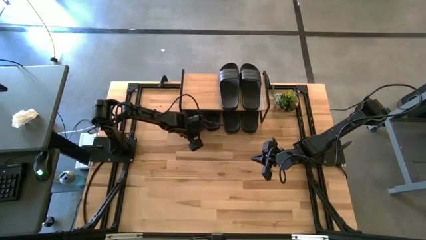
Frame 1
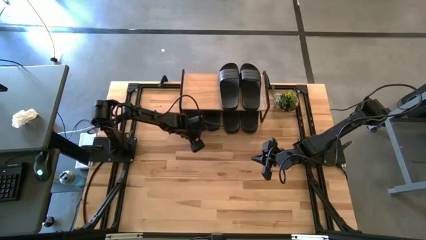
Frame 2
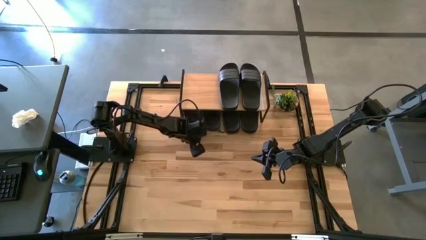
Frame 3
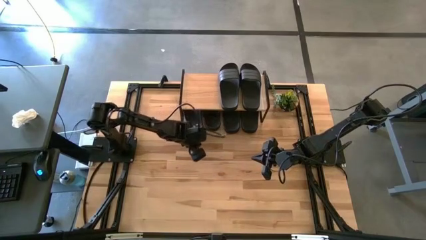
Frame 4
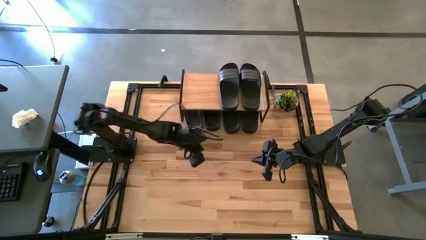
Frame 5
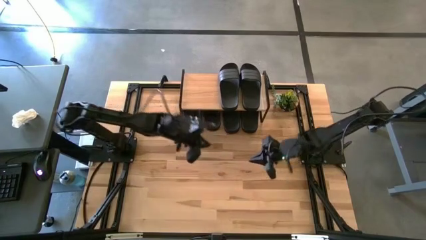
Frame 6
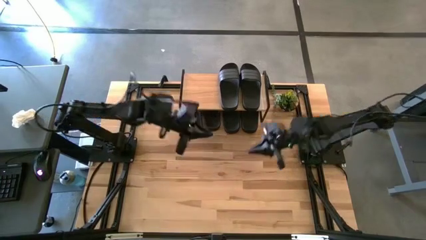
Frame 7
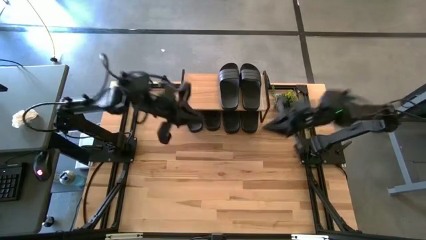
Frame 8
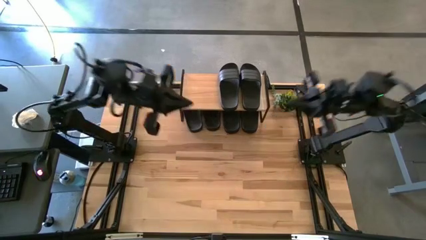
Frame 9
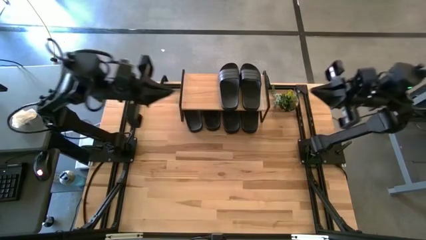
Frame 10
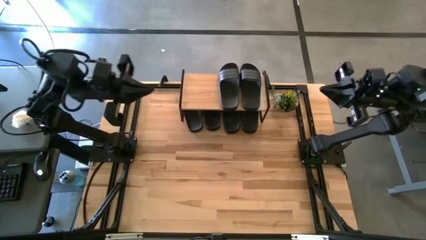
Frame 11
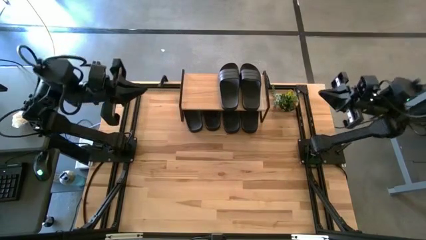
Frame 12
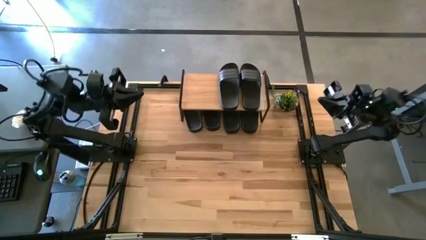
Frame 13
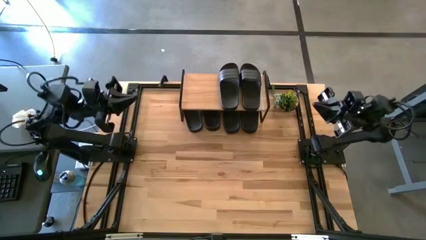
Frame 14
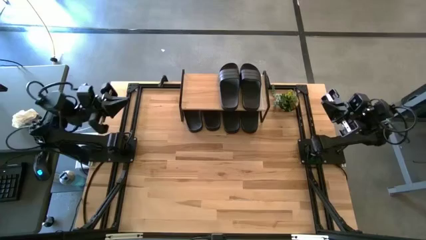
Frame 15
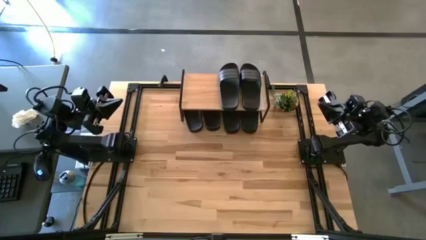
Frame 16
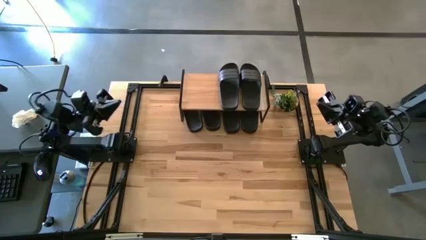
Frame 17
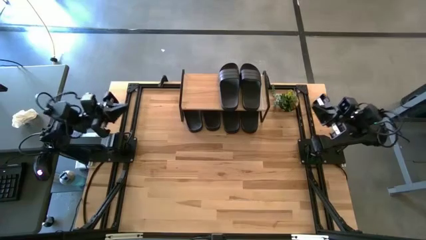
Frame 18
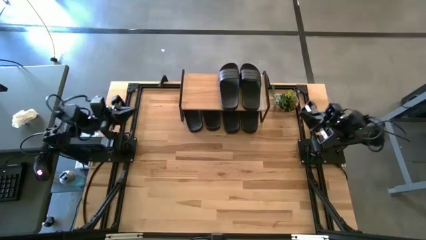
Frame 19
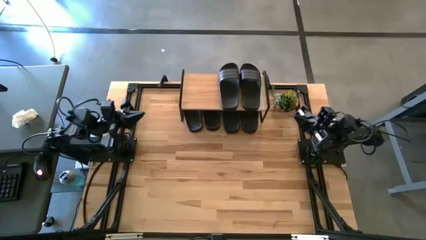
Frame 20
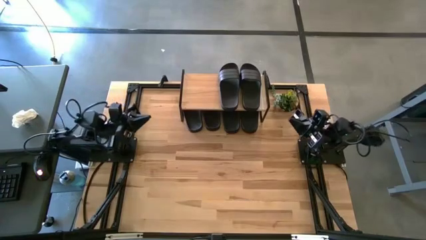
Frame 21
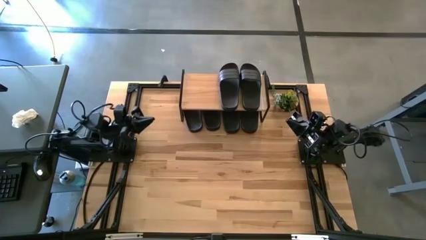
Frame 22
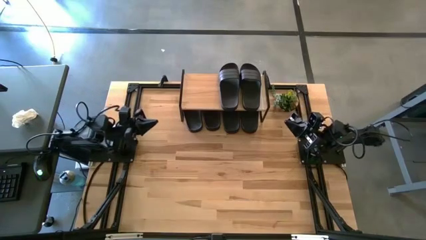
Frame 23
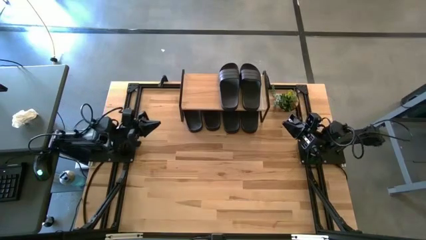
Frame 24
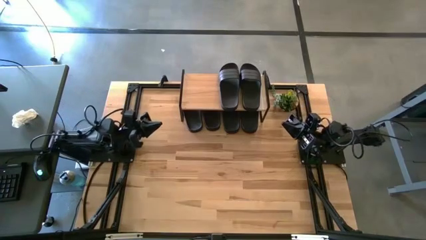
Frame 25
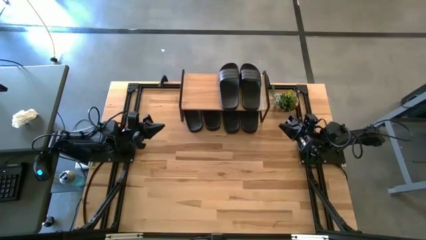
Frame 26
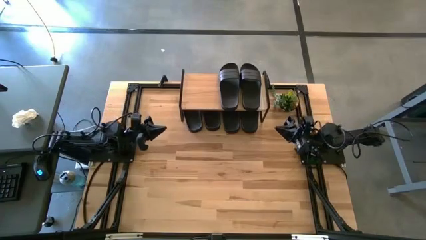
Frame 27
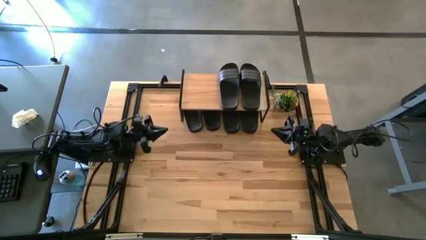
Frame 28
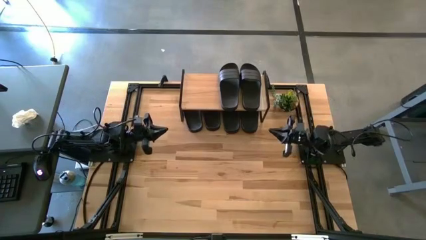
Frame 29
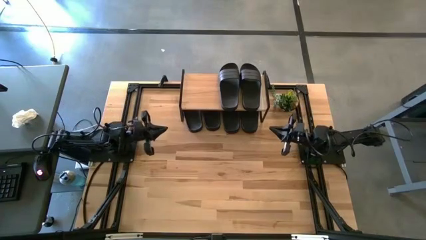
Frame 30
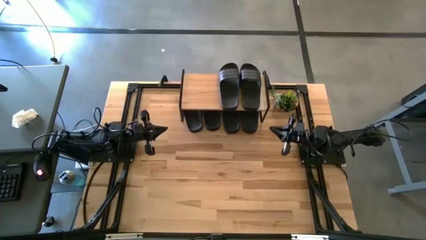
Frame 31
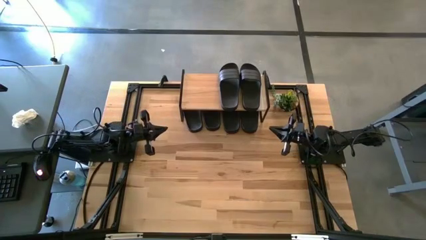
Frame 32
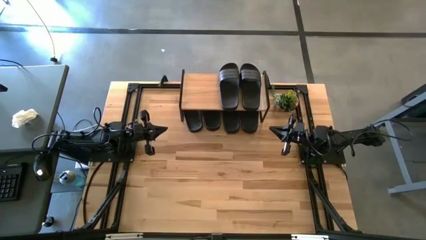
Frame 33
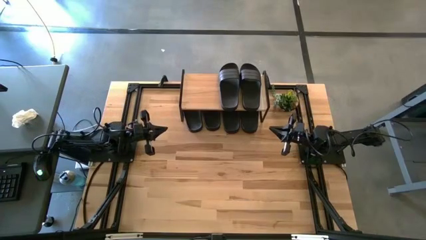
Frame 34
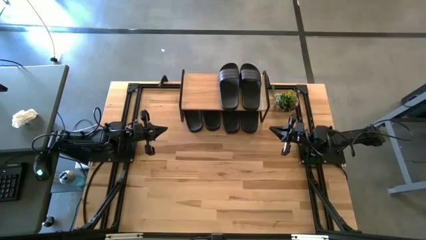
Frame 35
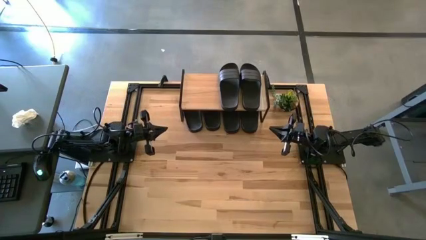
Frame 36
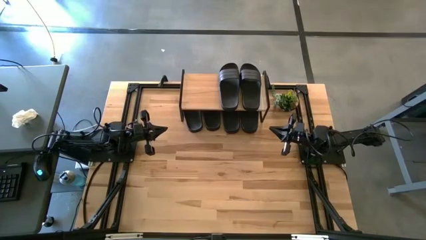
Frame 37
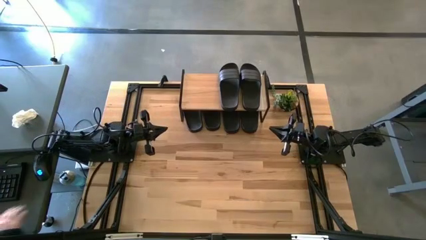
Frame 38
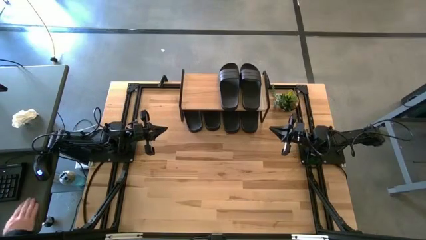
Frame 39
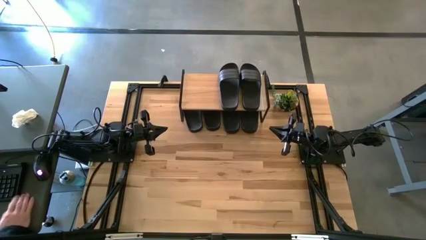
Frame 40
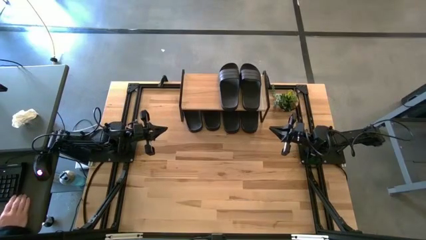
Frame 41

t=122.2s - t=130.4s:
Task: Pick and place slides into the shelf
Return to Home Position

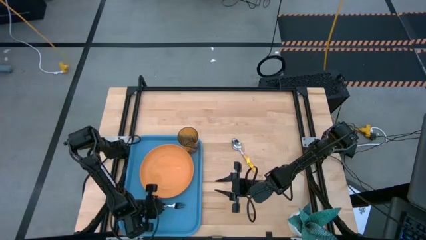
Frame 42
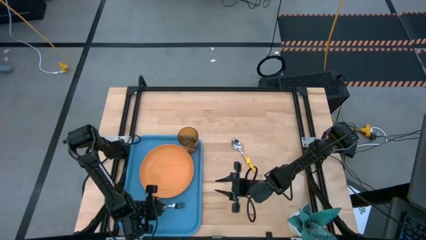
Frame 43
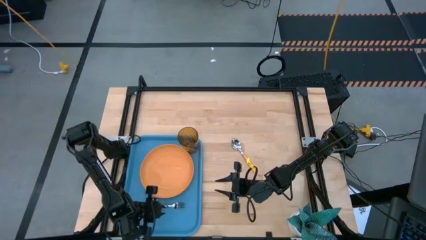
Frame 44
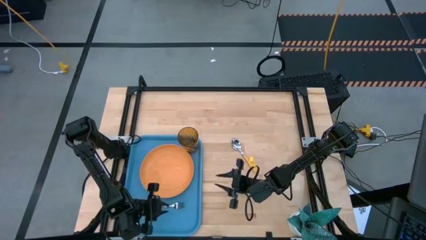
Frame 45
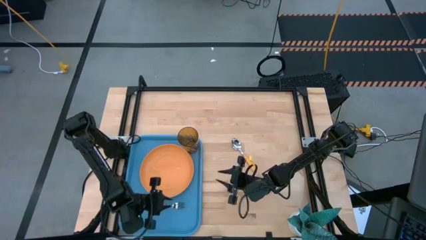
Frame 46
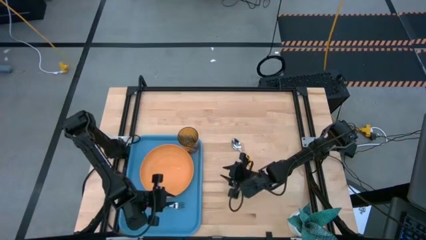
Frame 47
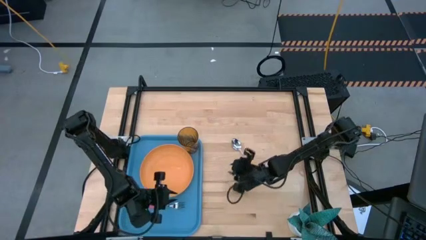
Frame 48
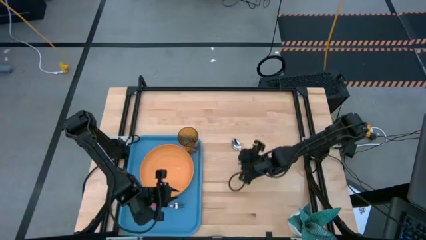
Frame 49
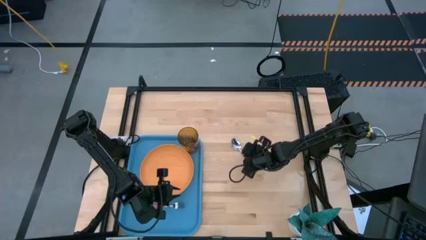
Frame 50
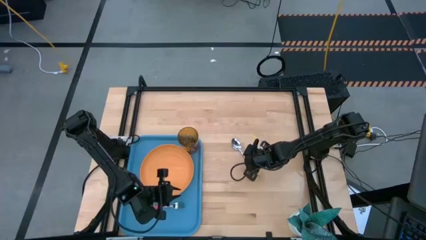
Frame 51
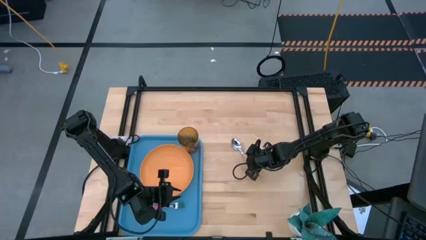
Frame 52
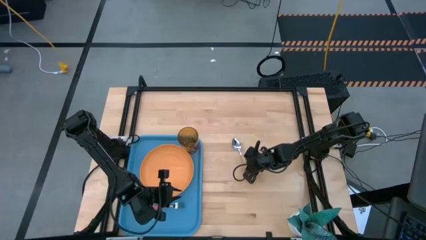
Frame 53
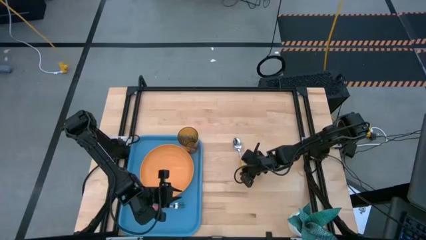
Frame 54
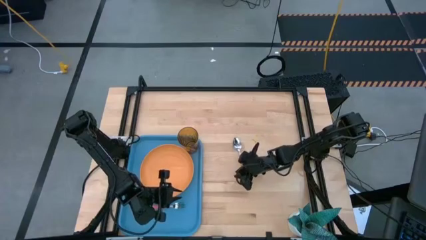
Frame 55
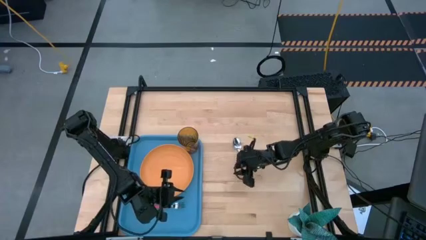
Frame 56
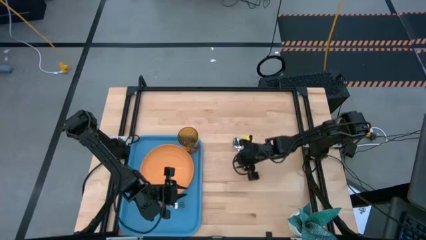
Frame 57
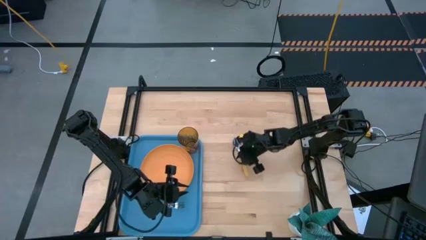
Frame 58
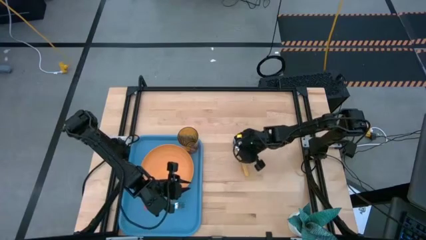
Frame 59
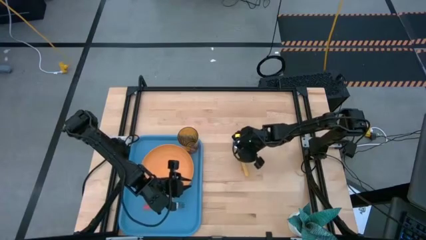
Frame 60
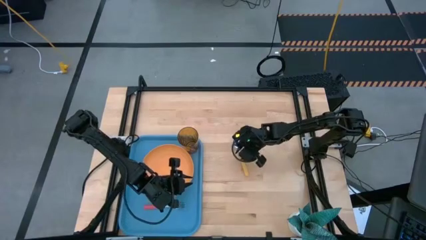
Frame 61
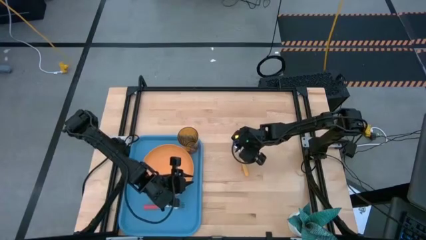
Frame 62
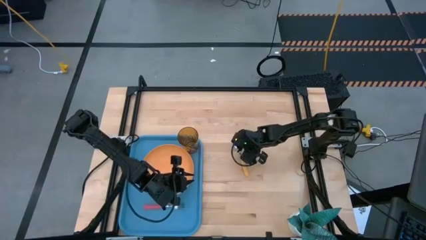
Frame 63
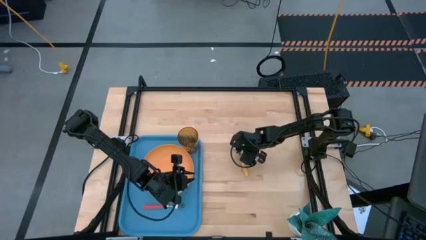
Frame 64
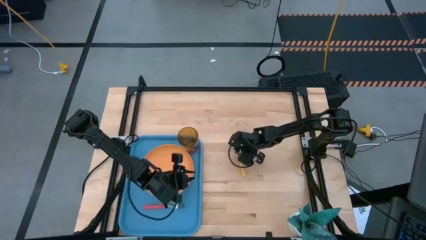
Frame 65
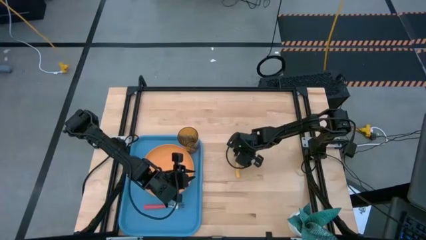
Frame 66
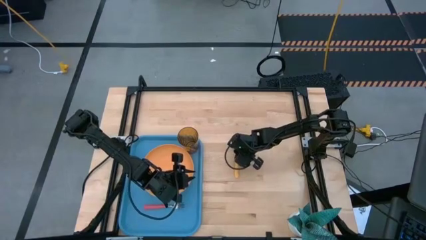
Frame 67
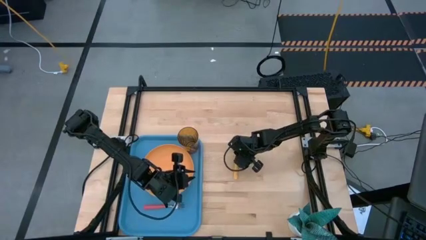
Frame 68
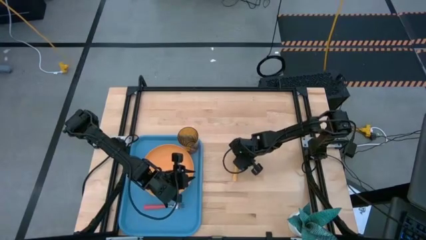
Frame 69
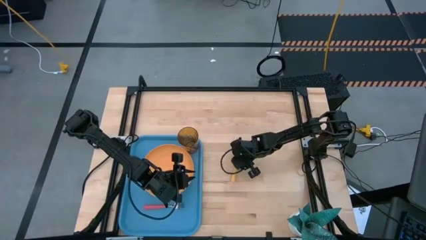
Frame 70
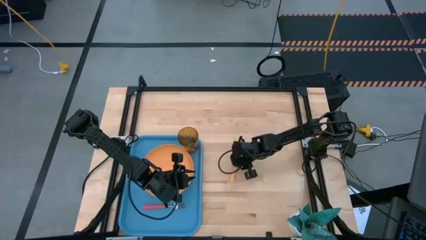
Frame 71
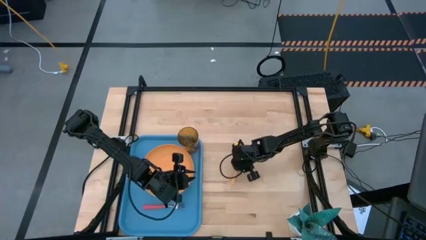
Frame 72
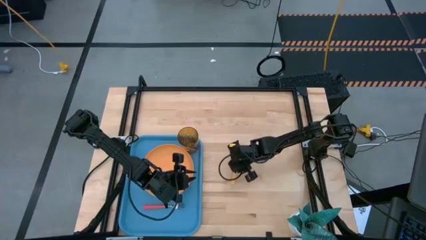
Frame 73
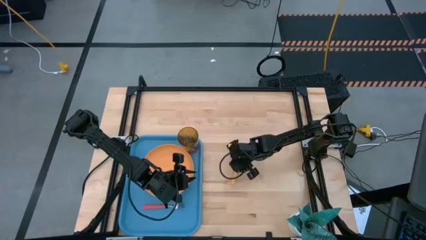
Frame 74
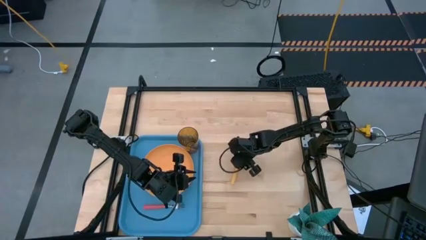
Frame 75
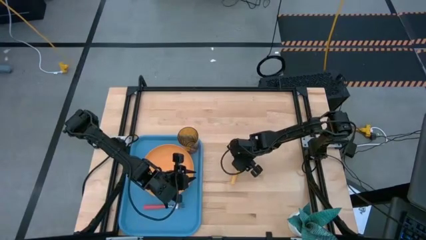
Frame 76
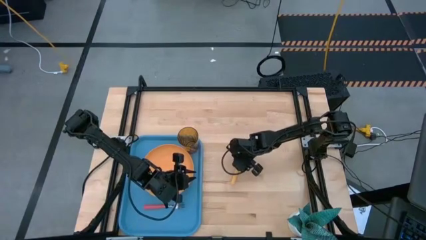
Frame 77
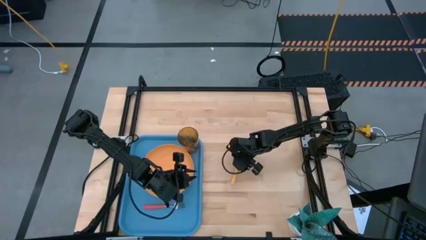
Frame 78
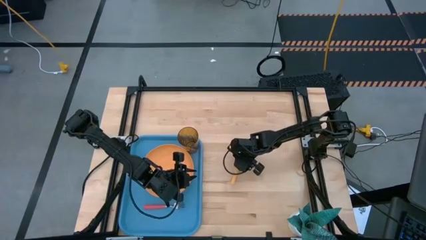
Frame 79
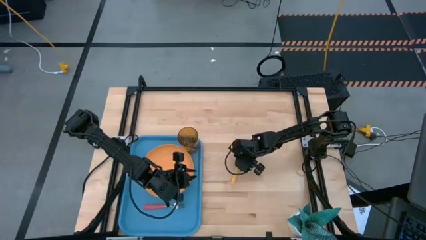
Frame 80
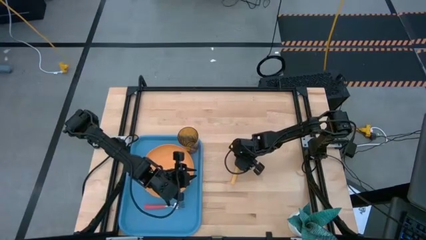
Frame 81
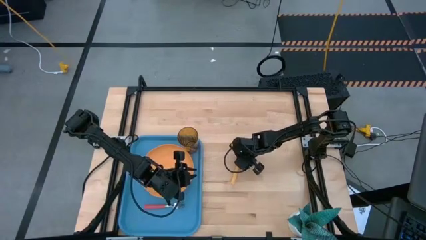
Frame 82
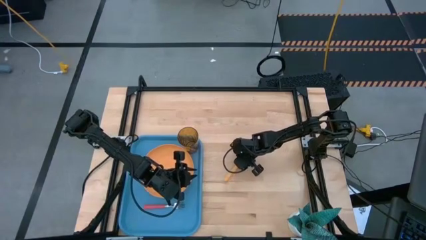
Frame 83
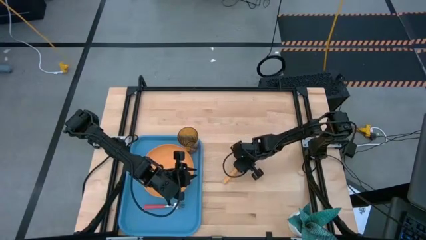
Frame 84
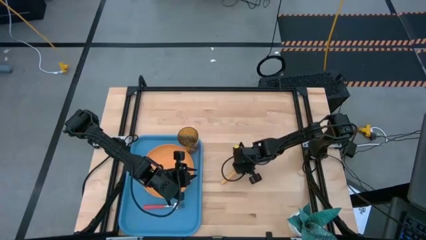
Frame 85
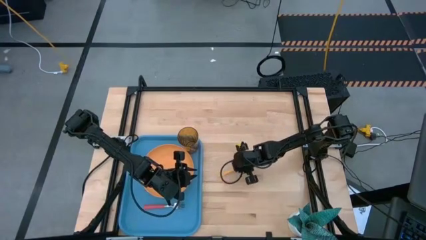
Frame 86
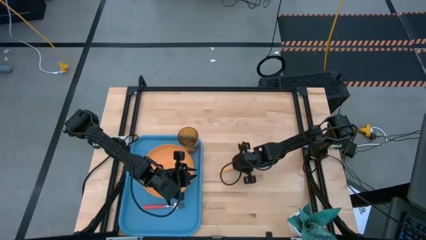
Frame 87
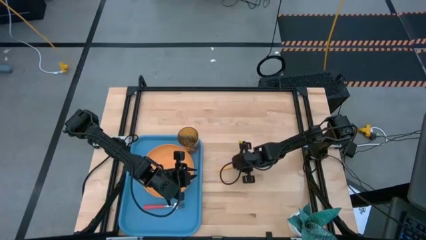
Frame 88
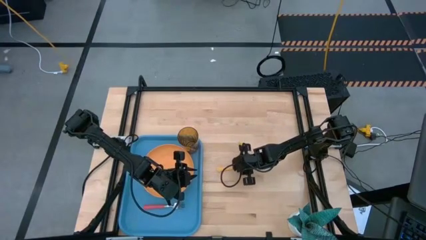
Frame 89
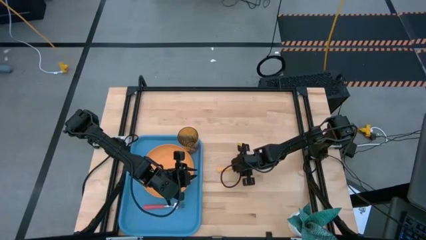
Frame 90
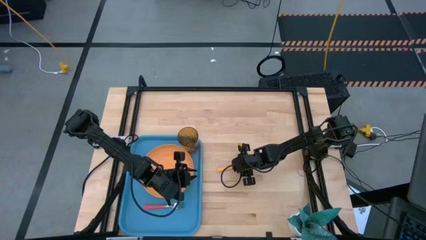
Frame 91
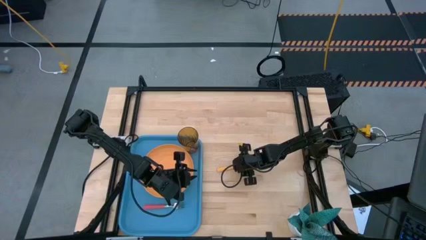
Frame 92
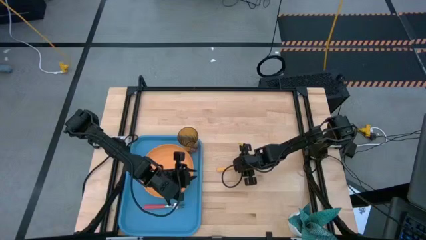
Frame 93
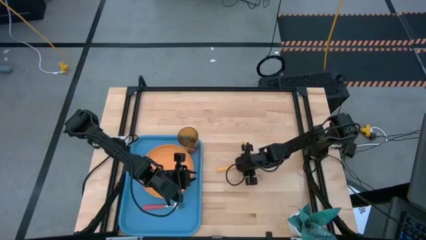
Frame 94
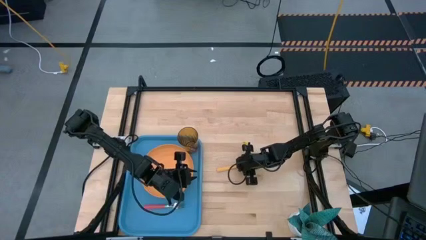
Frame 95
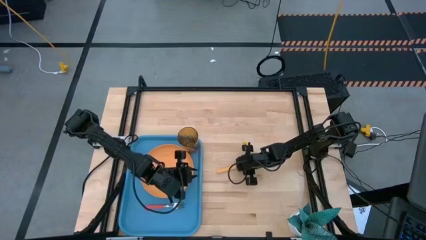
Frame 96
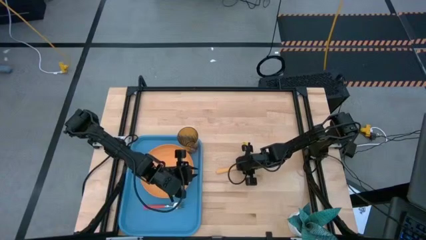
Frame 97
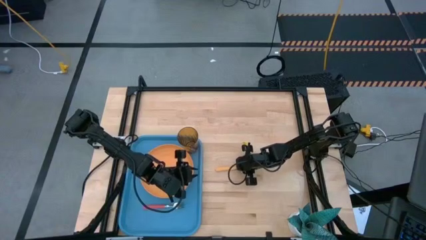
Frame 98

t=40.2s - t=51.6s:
Task: Pick and place plate/cup/fork/spoon on tray
Put the yellow spoon on the blue tray
